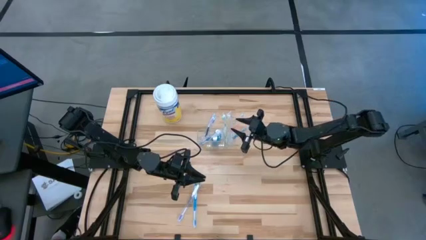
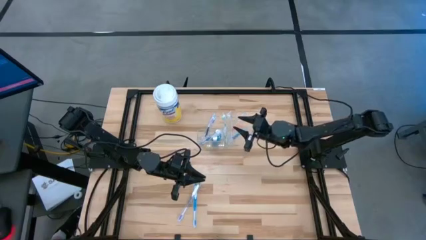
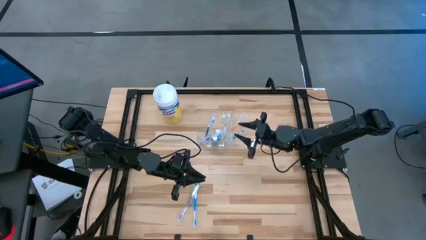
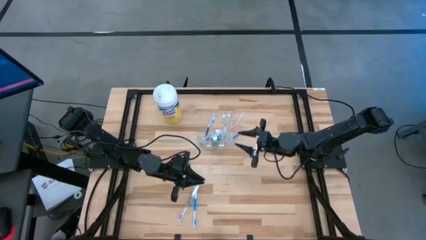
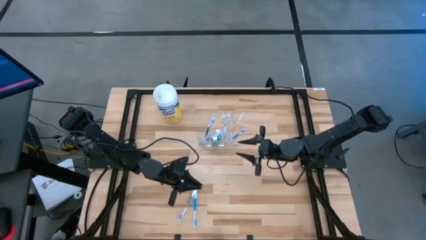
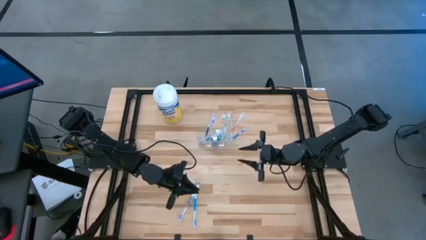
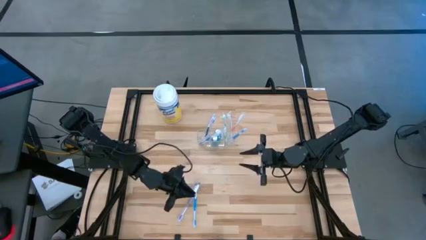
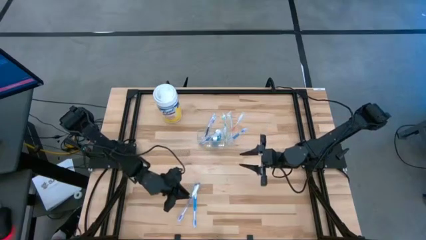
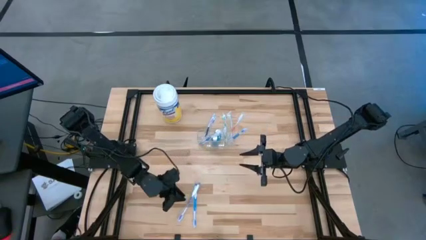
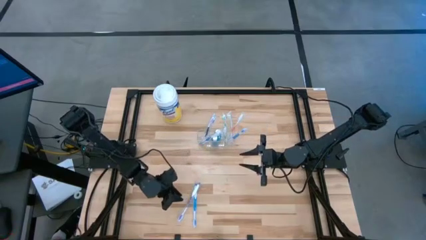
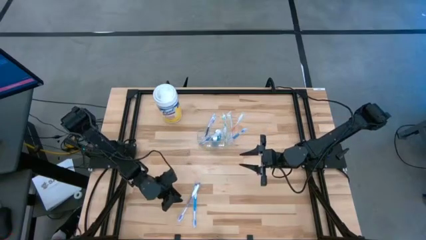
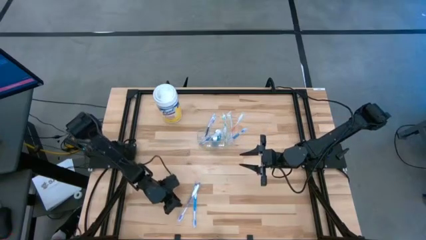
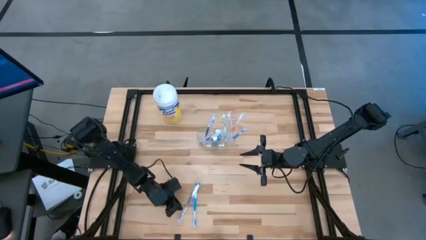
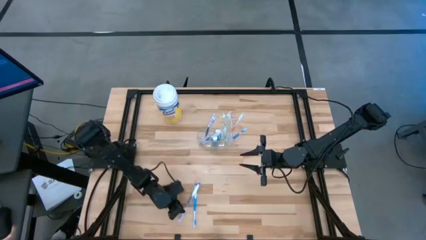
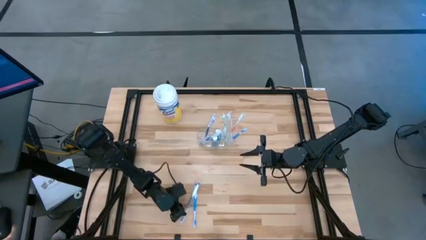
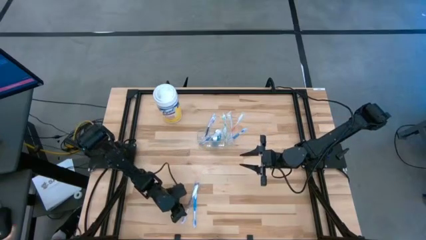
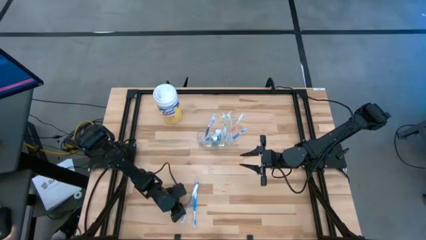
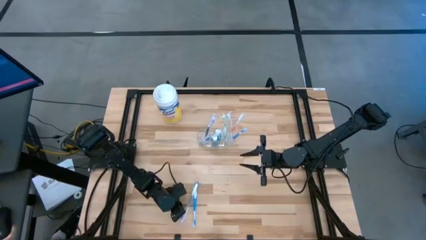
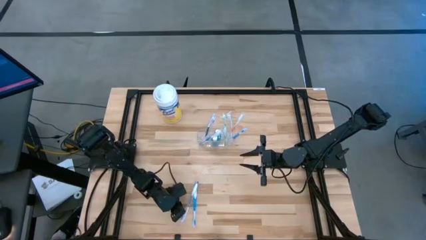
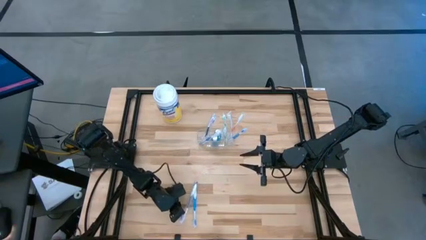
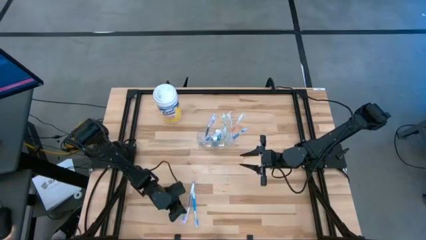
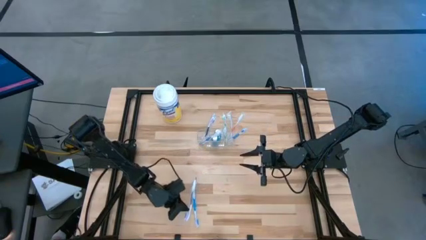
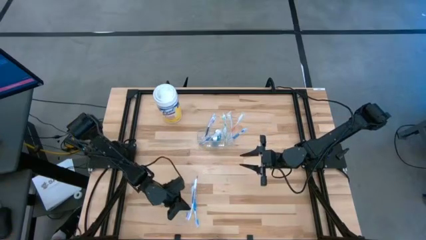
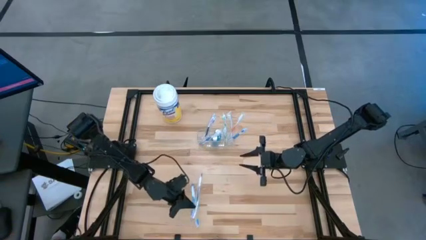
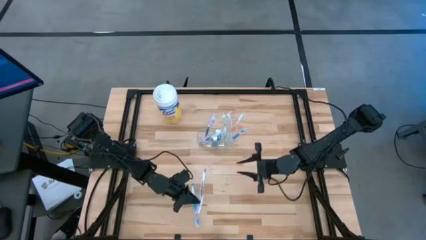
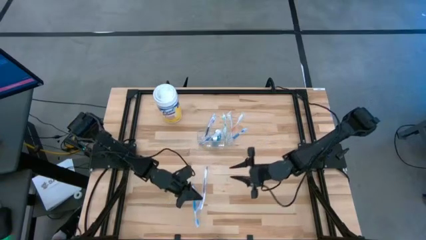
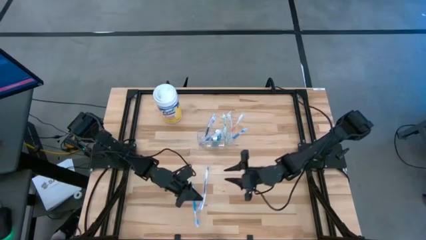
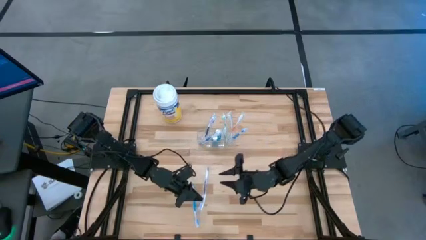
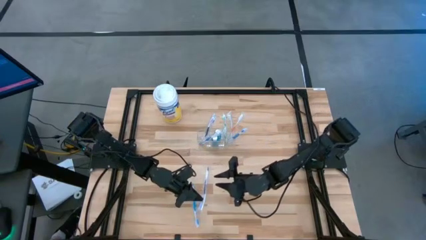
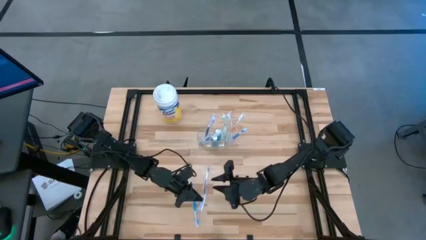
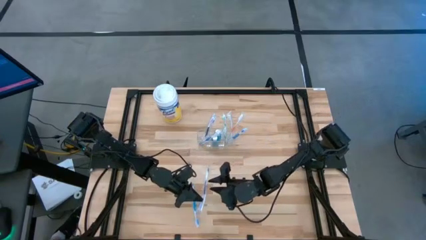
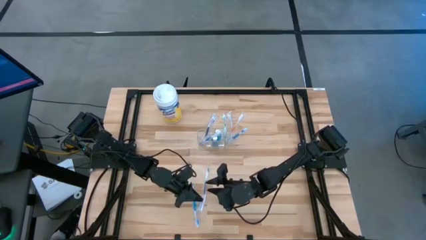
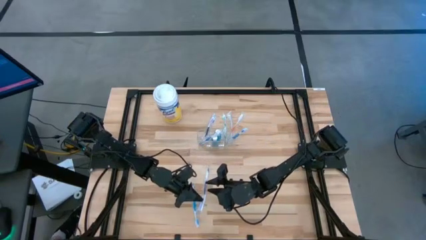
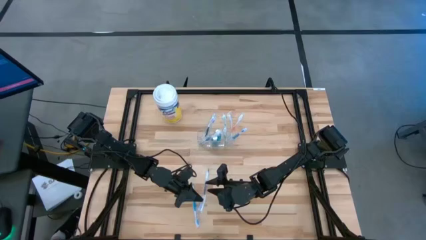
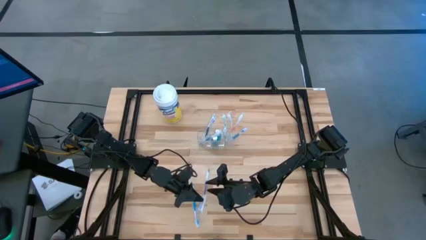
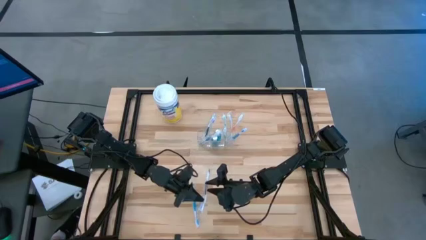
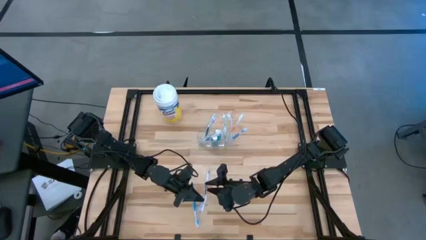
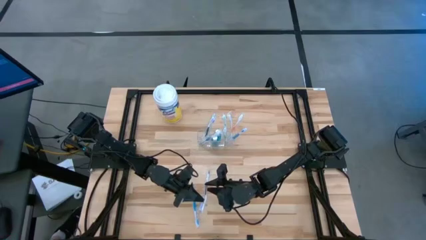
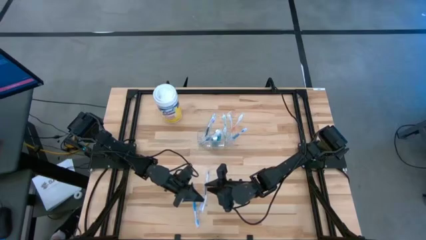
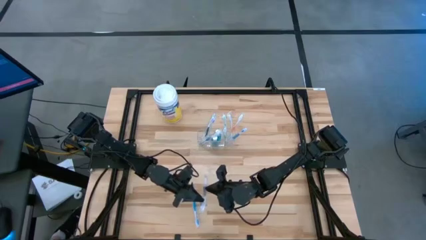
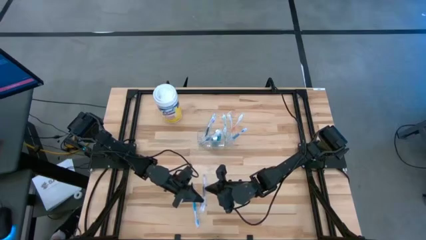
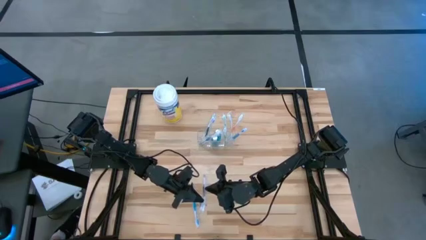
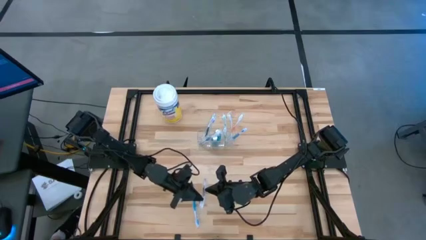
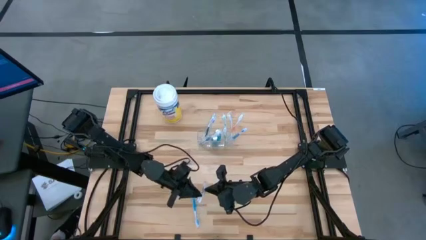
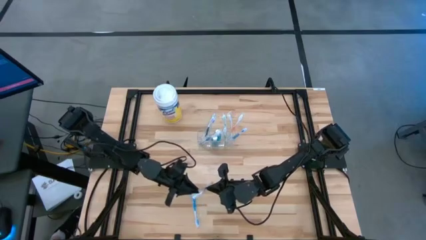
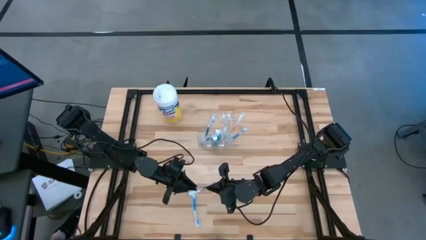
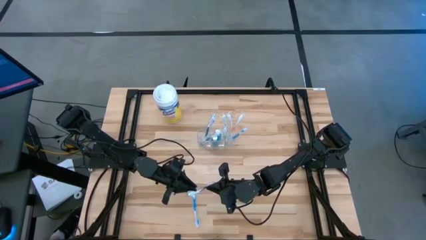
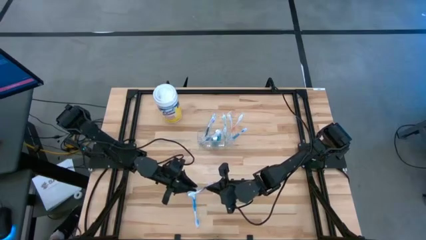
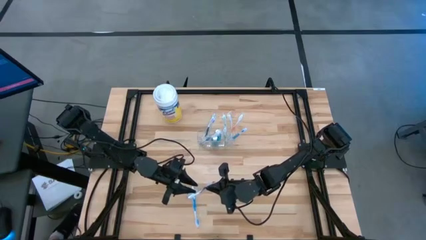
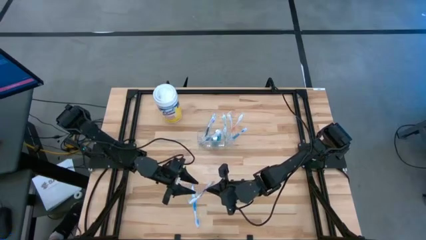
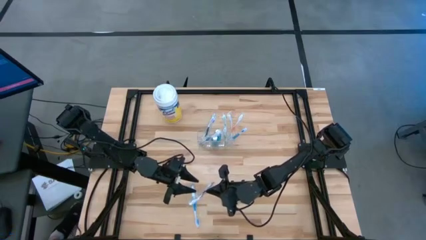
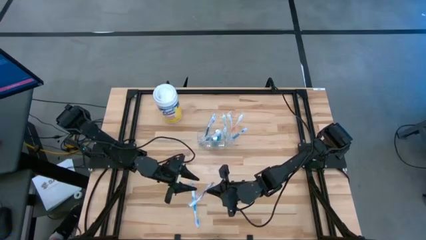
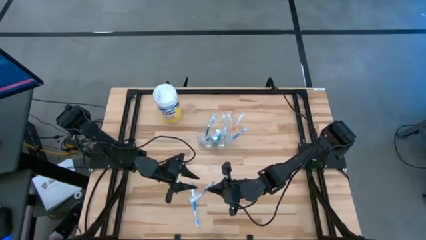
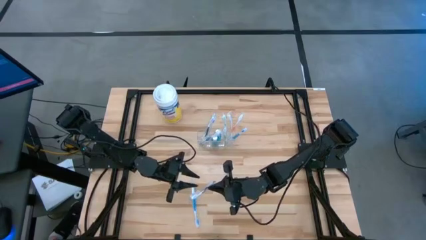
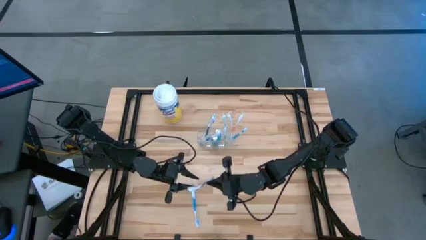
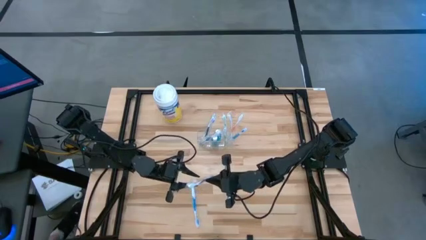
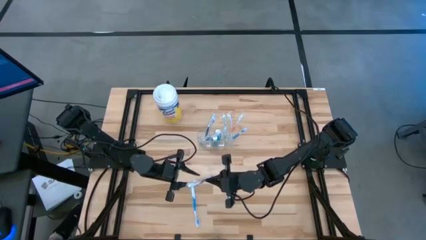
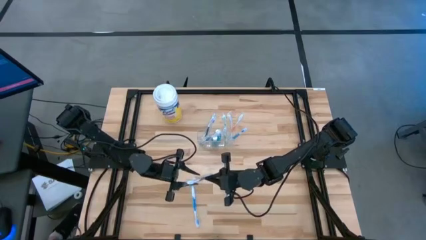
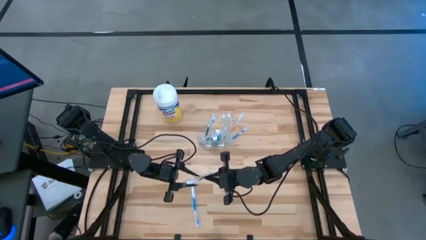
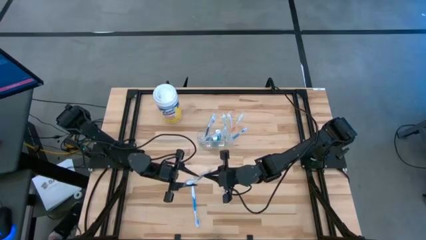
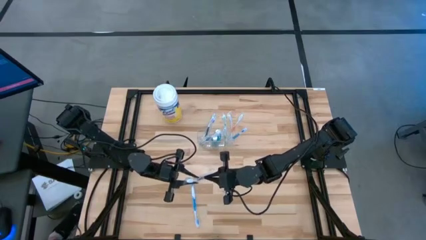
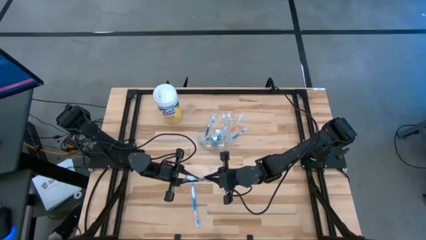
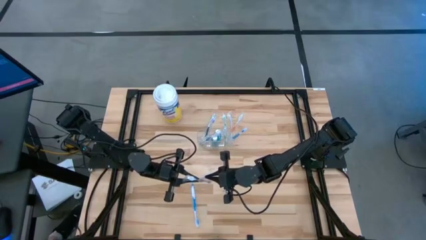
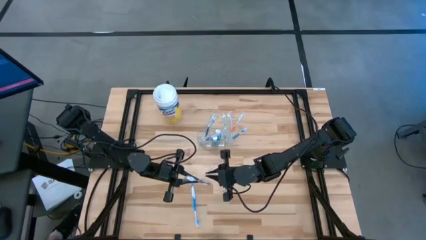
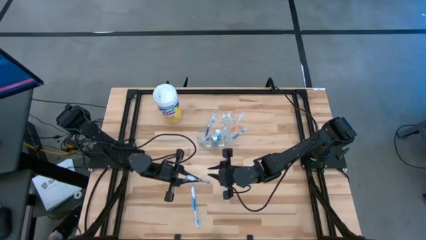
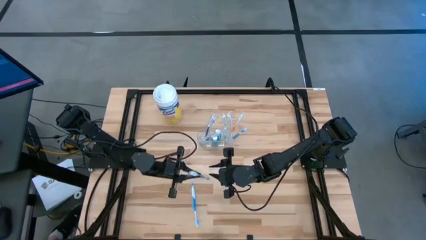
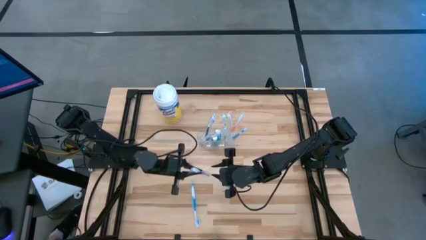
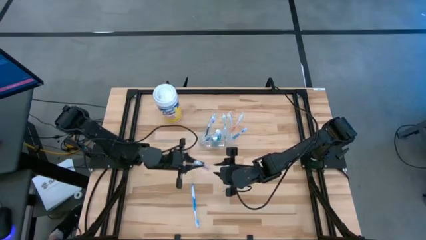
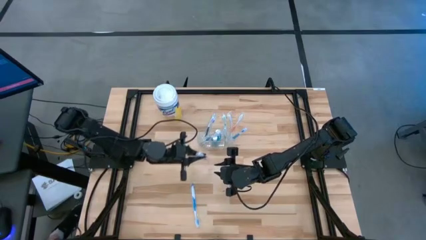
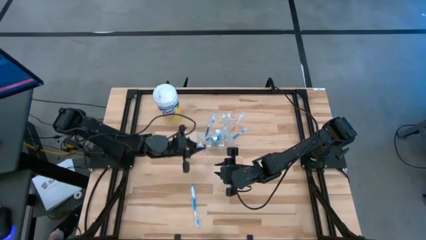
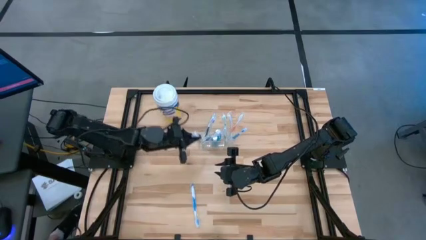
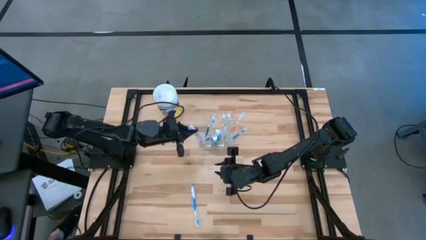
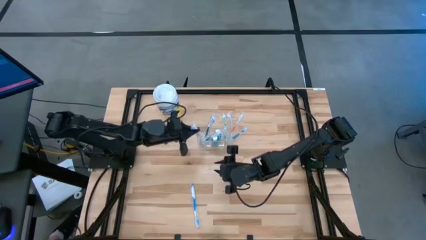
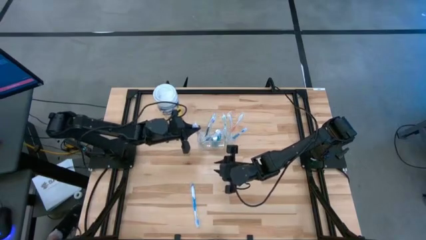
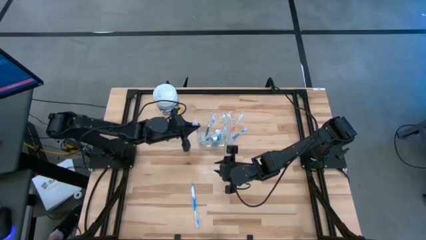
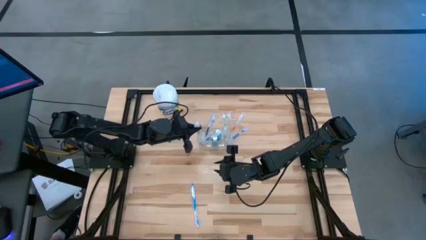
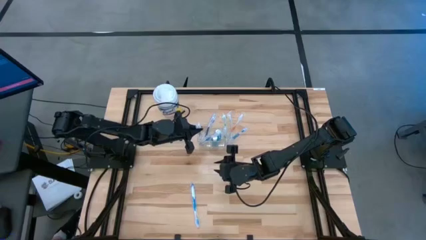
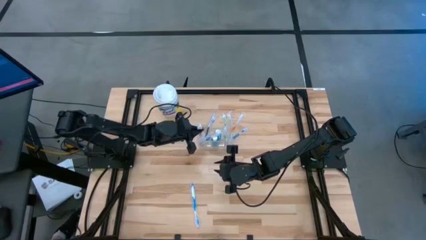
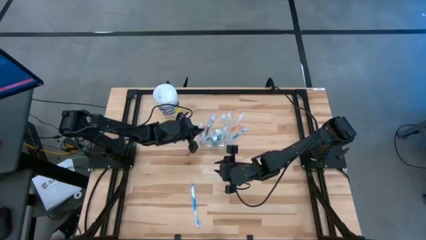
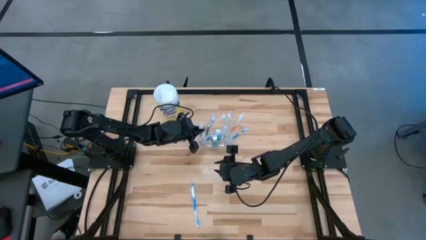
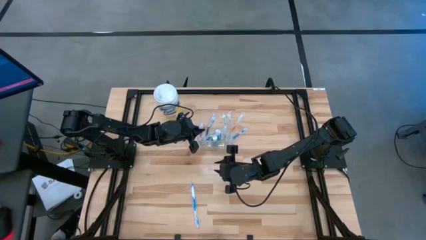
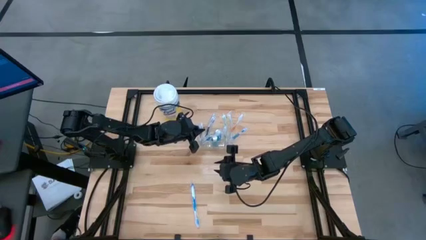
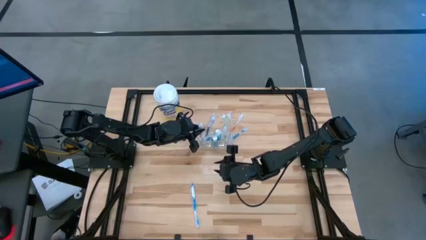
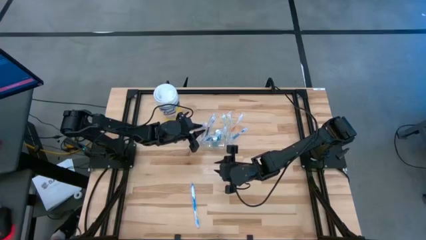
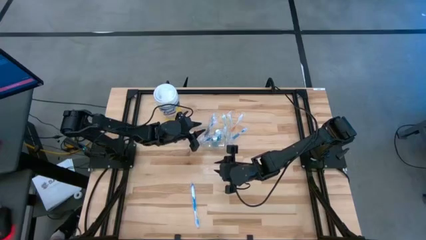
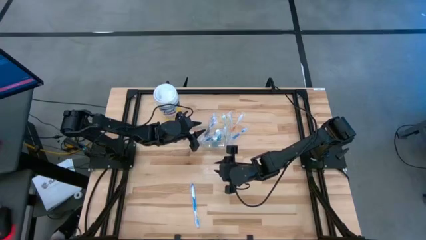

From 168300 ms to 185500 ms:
Task: Pick & Place toothbrushing station
Put the purple toothbrush into the transparent organizer
